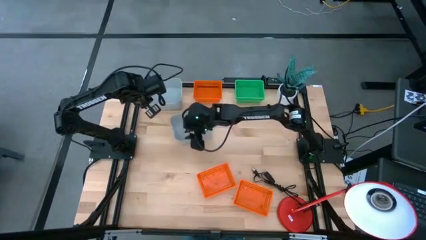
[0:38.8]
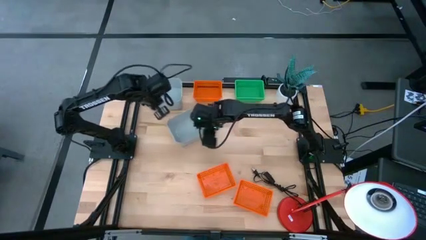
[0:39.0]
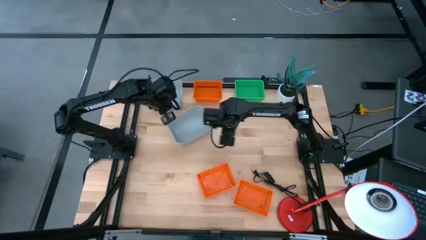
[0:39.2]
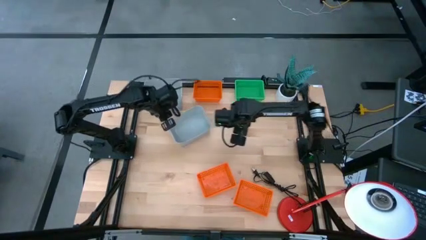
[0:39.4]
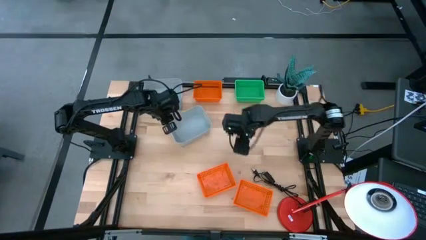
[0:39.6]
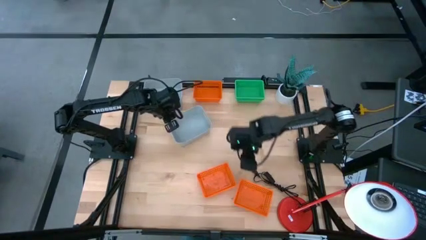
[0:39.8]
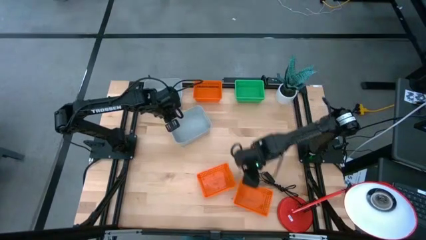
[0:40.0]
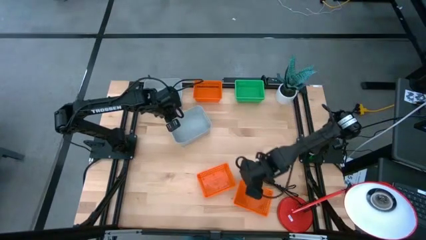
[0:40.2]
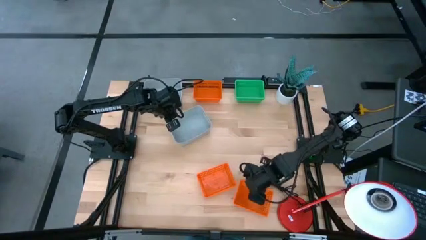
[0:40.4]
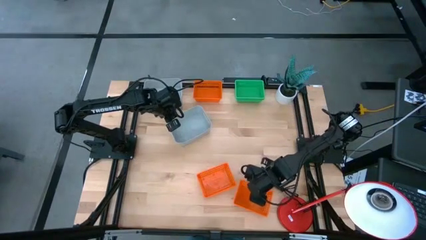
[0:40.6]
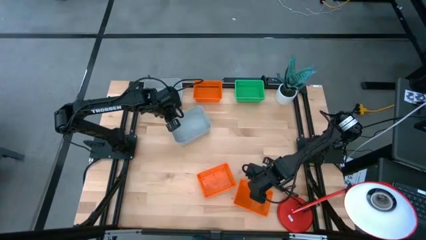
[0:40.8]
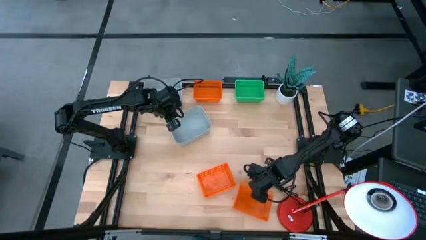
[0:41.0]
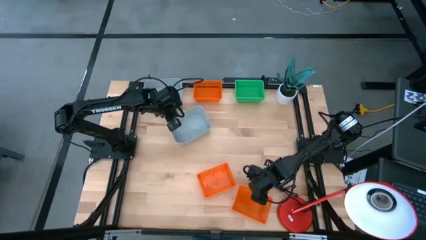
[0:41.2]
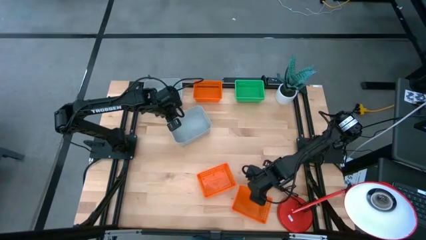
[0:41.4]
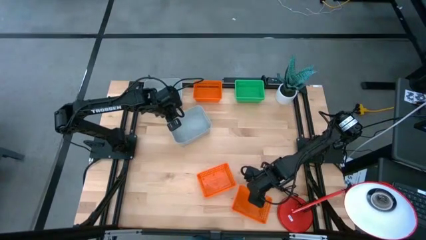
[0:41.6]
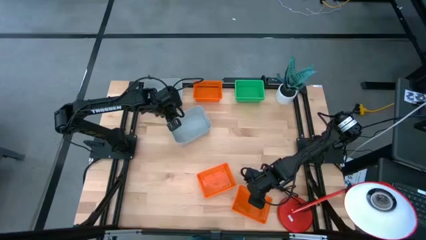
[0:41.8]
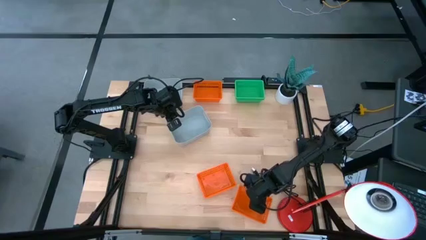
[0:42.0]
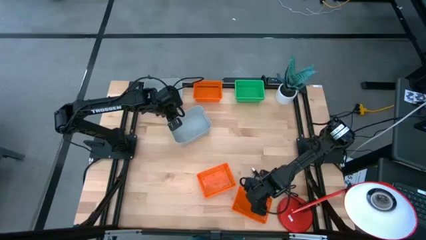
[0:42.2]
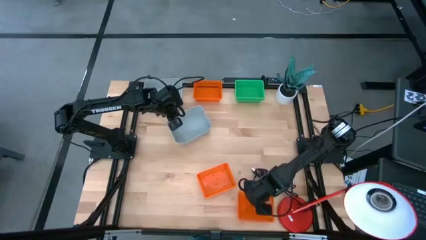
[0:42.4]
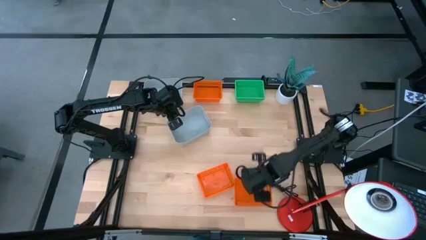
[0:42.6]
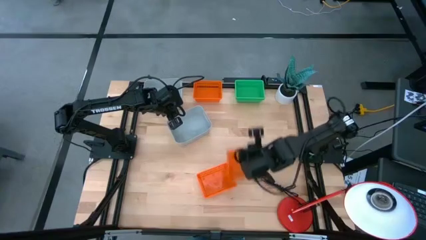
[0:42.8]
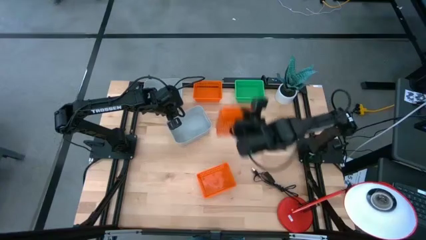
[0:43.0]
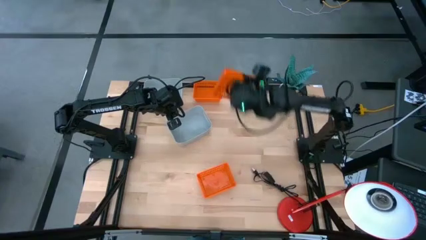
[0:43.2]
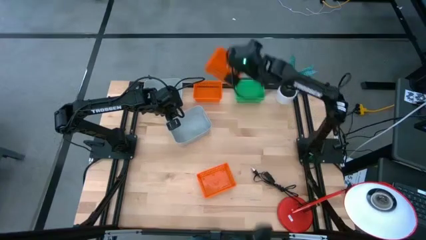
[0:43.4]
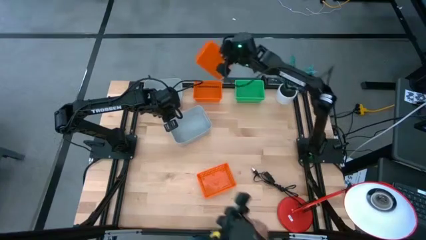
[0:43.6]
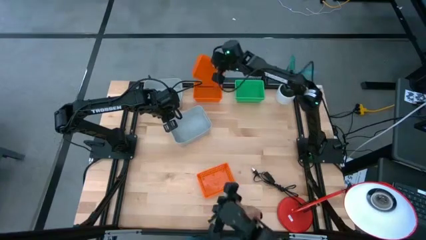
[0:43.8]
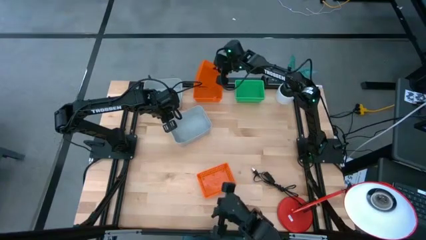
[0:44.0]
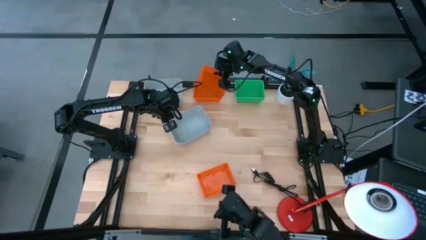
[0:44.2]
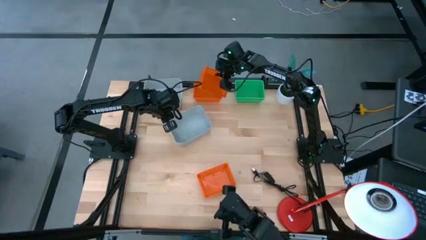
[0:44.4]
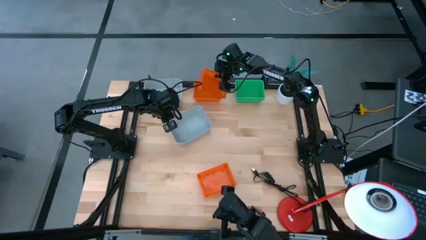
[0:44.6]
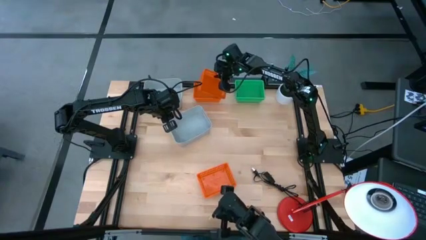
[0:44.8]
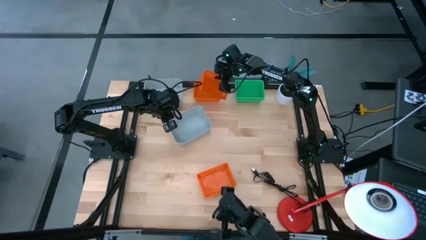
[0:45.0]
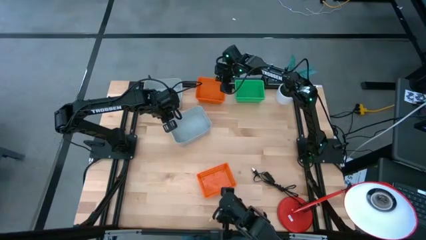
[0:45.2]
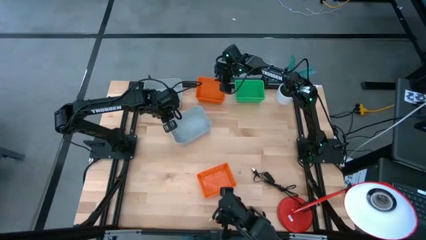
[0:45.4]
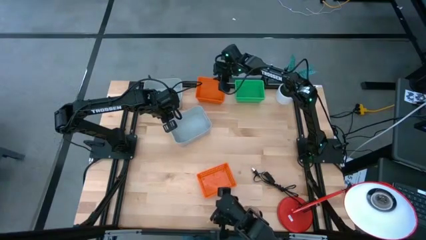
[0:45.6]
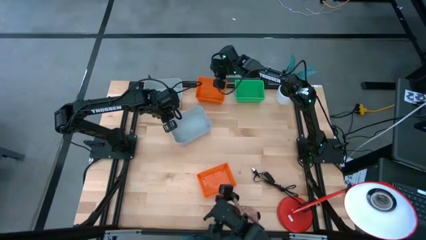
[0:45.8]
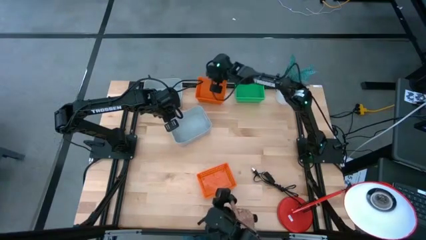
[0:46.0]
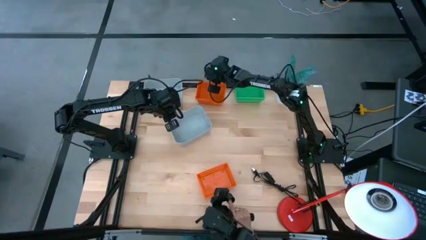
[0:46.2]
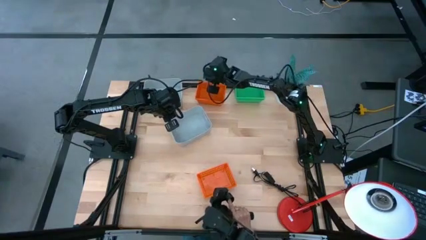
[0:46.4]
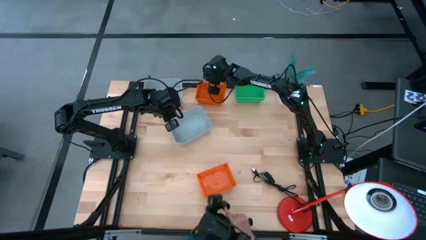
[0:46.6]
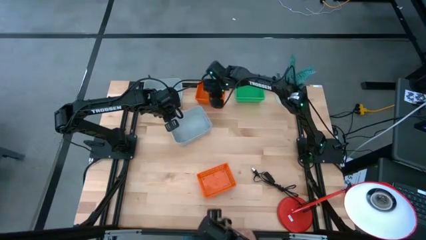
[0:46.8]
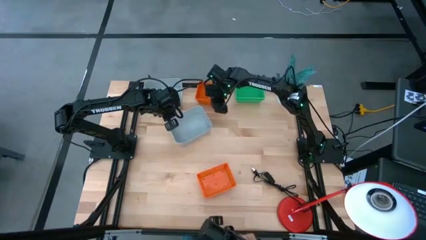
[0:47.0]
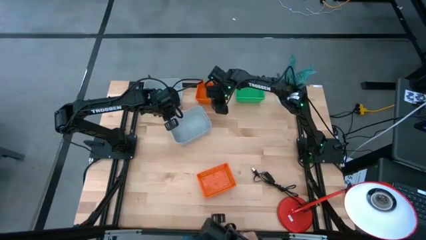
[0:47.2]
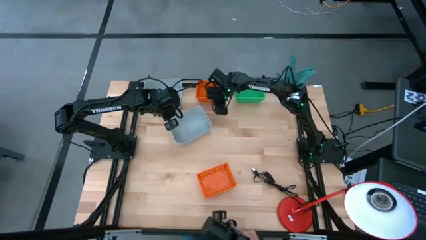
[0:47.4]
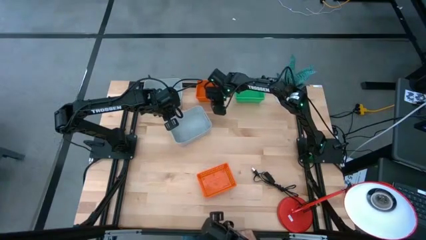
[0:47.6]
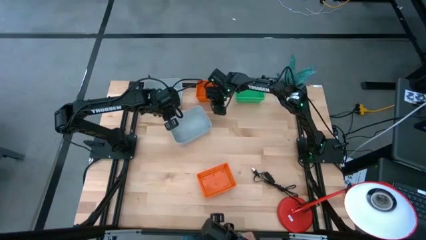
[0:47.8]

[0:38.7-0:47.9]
Stack the bottom right orange bin on top of the top orange bin

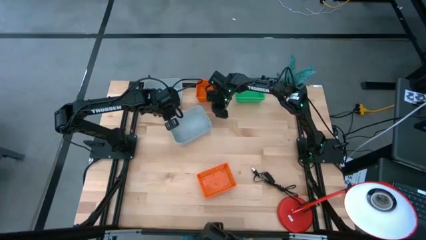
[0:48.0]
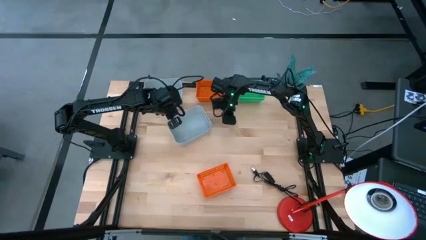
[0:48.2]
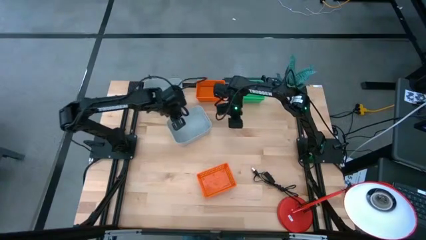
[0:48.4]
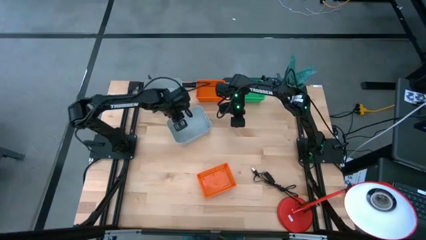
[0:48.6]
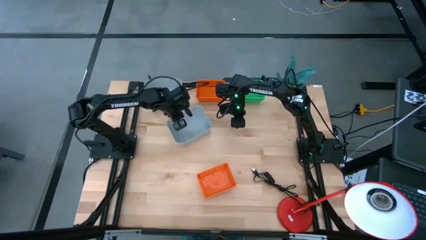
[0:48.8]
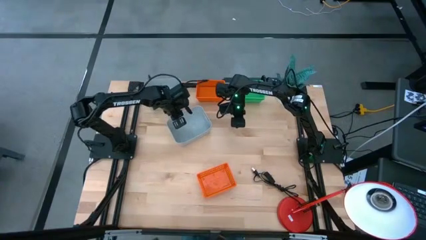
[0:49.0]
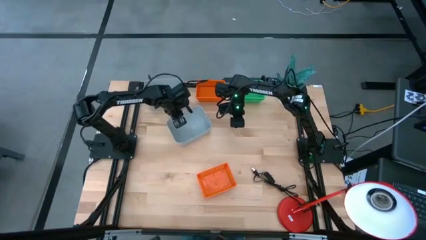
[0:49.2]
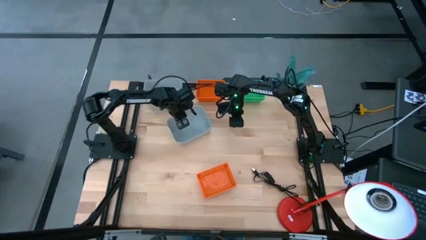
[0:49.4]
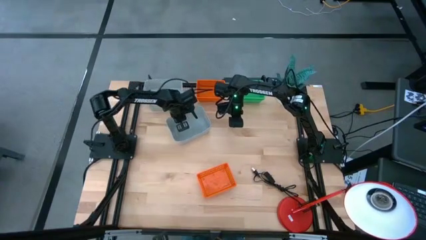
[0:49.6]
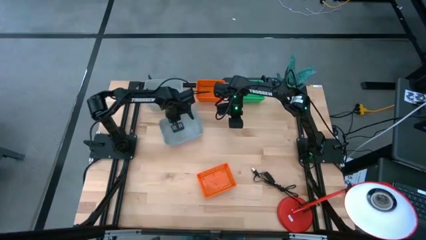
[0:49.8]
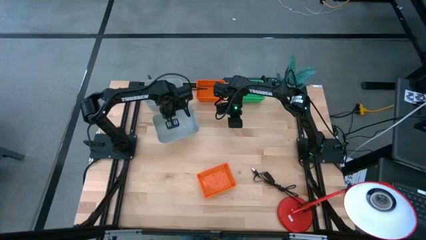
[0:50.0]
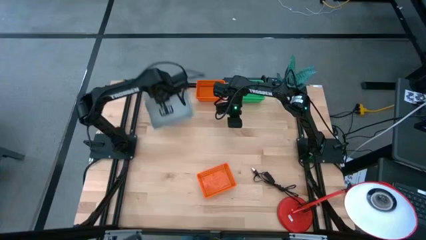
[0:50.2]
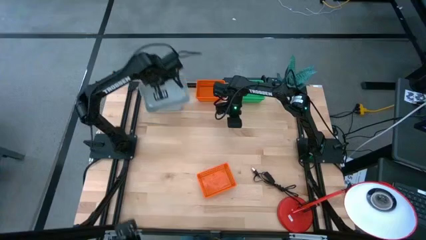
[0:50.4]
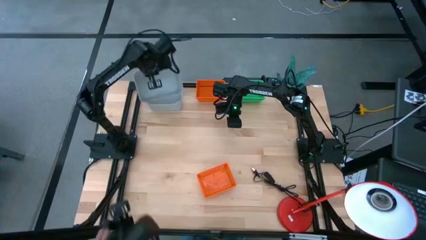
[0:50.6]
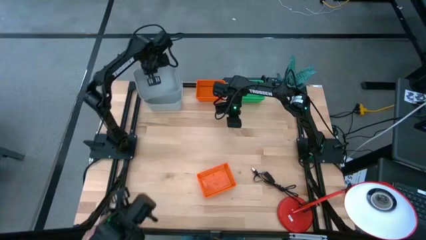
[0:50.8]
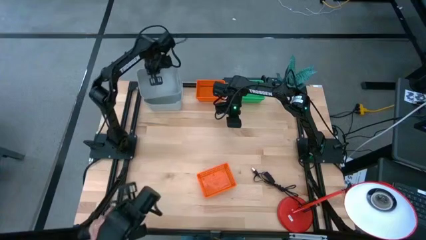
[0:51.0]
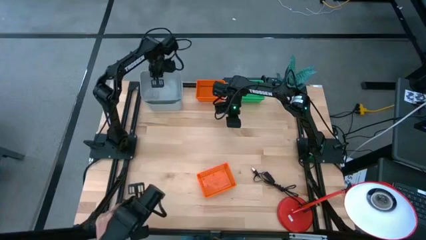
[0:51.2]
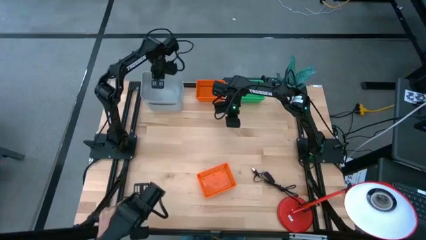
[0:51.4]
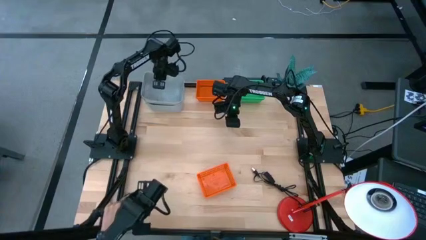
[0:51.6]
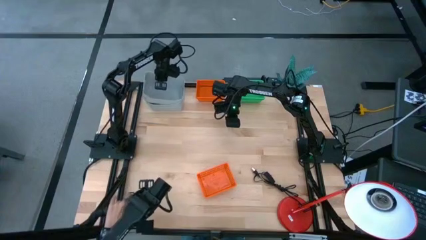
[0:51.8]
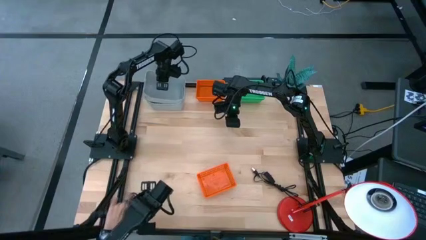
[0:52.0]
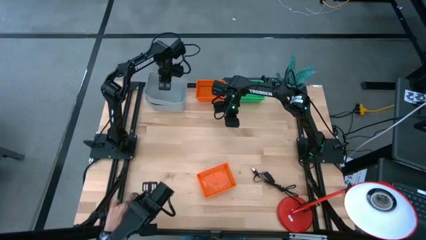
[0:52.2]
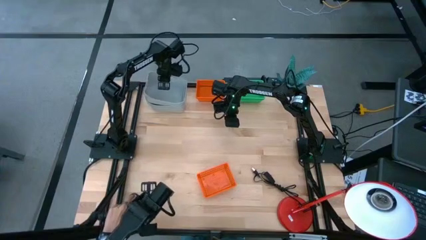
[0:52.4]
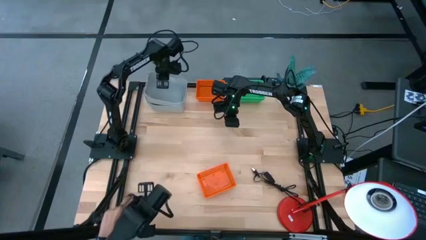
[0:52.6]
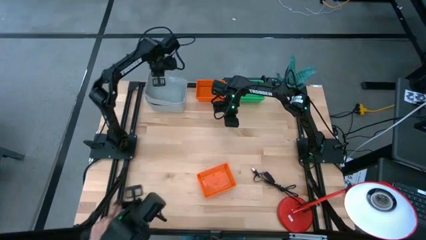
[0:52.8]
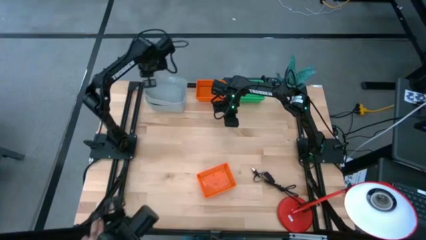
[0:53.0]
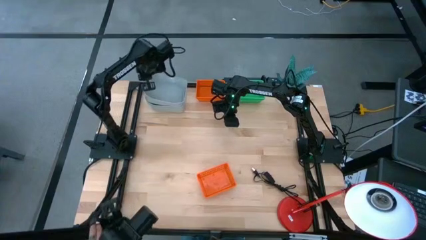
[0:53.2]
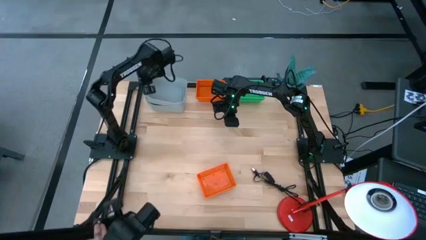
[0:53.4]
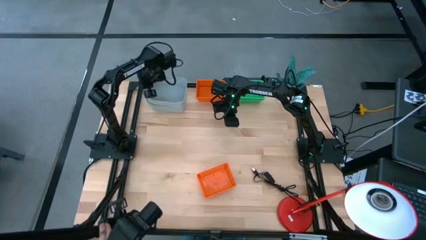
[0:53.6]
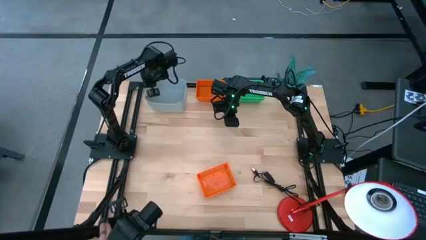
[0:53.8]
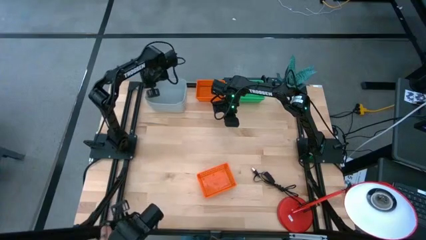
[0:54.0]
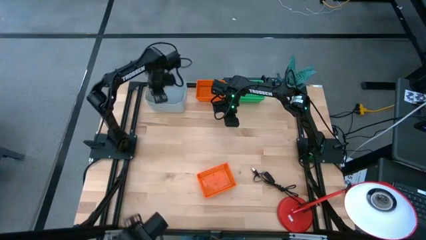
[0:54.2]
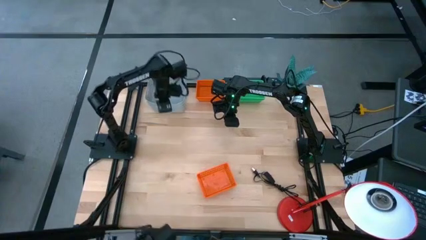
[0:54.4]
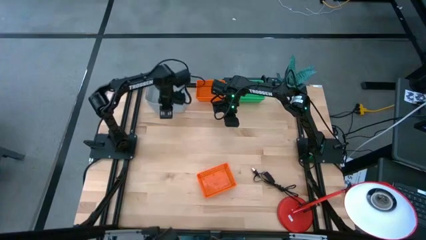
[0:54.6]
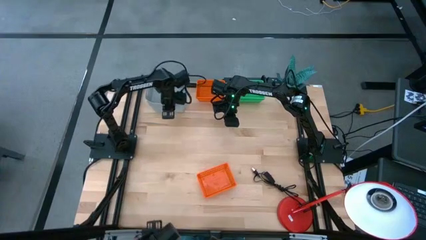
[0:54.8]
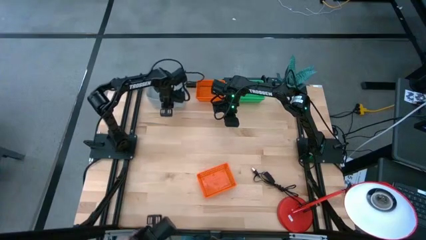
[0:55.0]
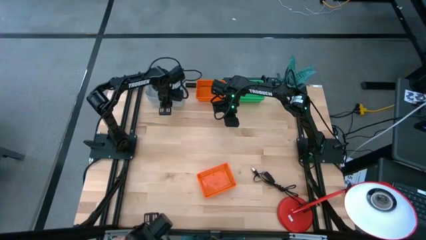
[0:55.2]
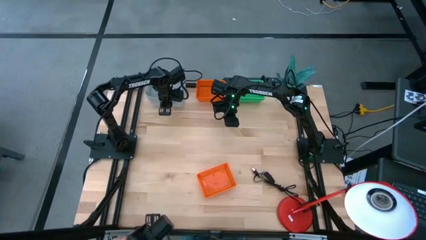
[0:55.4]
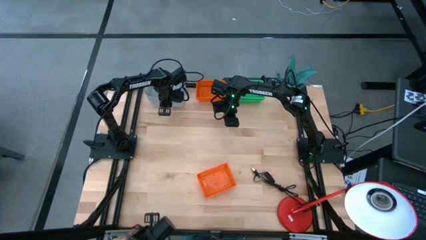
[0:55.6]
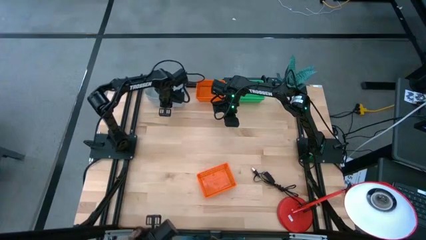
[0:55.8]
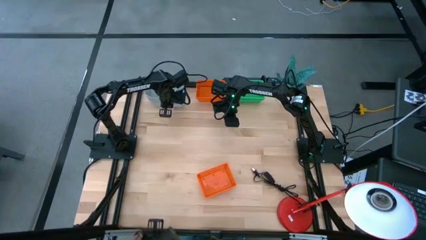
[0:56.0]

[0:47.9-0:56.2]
Stack the bottom gray bin on top of the top gray bin
